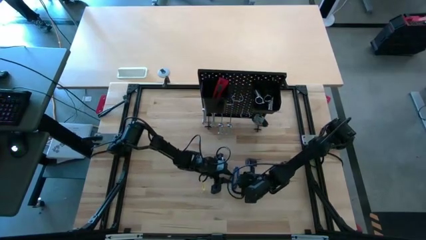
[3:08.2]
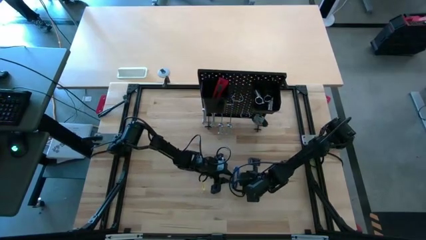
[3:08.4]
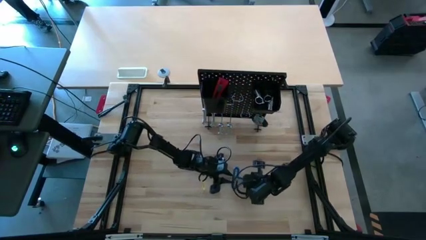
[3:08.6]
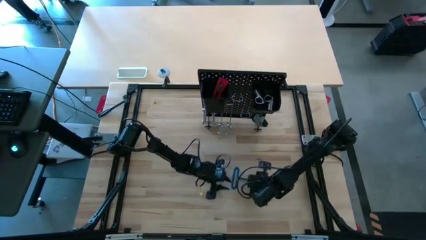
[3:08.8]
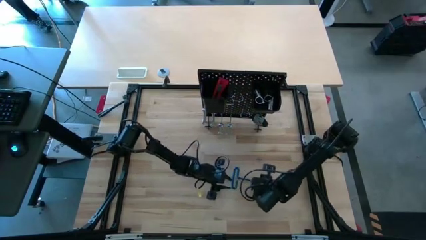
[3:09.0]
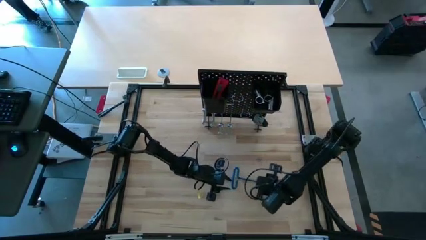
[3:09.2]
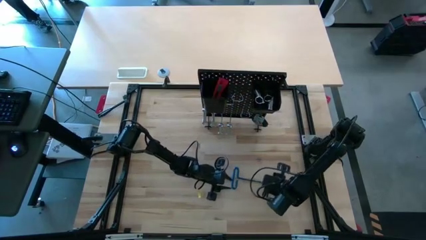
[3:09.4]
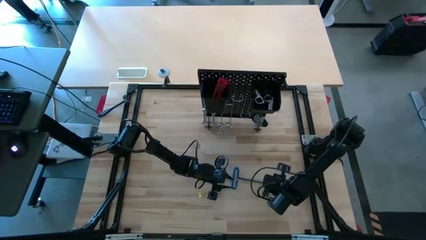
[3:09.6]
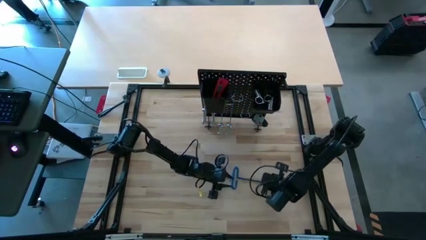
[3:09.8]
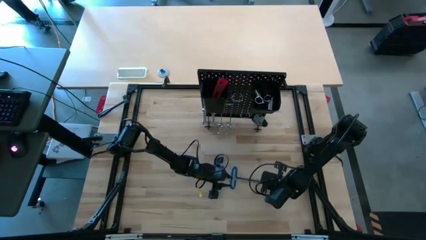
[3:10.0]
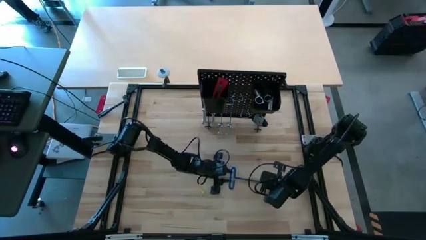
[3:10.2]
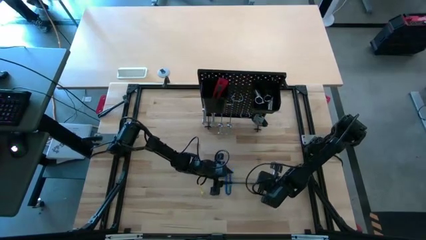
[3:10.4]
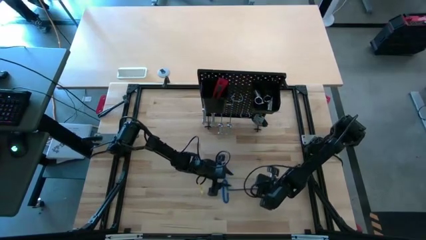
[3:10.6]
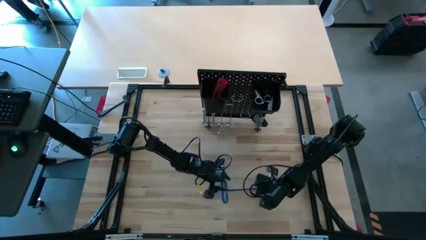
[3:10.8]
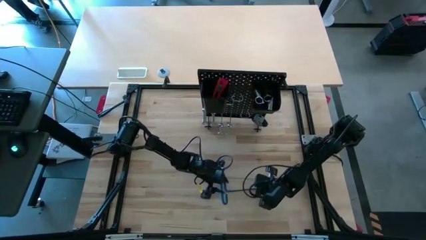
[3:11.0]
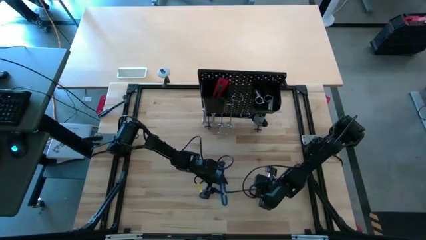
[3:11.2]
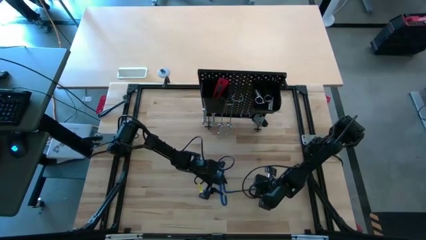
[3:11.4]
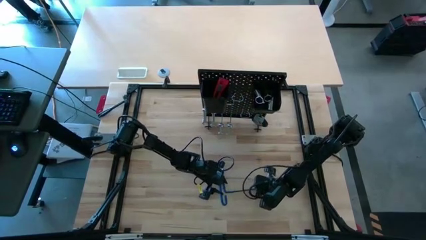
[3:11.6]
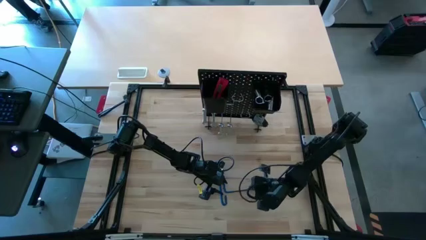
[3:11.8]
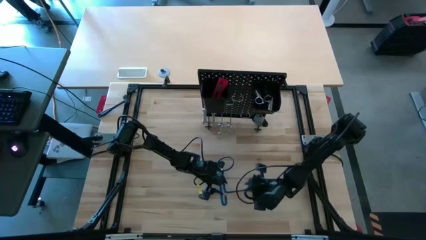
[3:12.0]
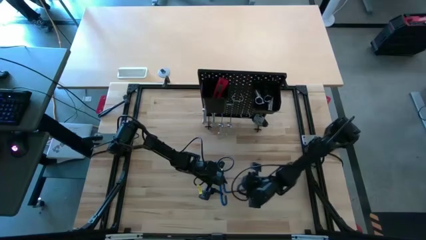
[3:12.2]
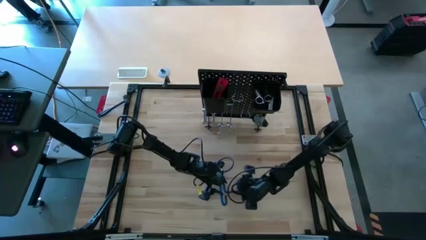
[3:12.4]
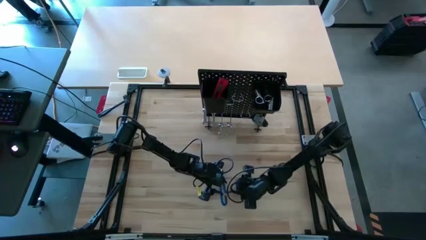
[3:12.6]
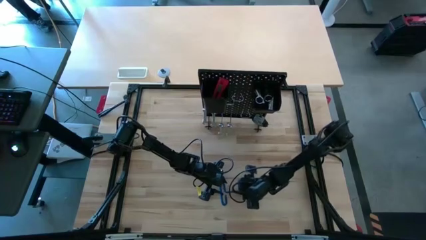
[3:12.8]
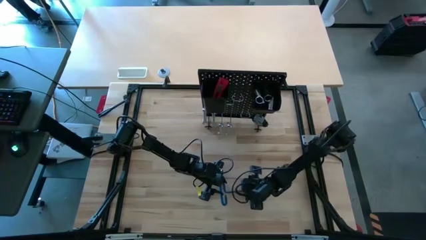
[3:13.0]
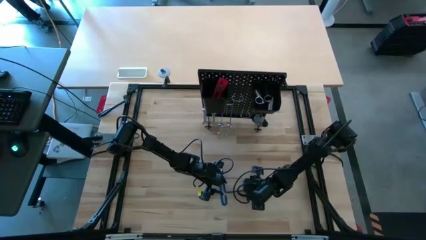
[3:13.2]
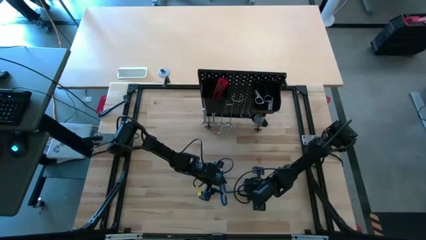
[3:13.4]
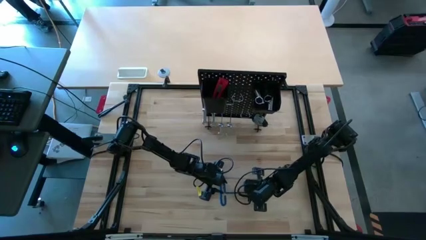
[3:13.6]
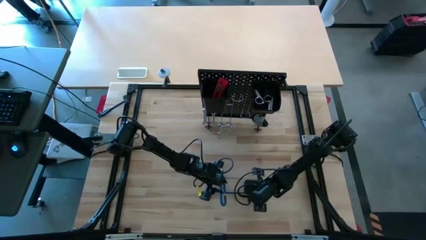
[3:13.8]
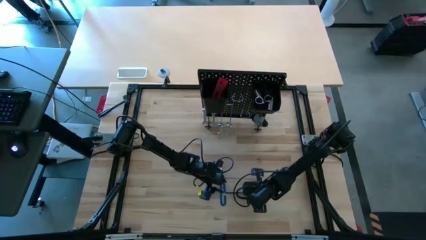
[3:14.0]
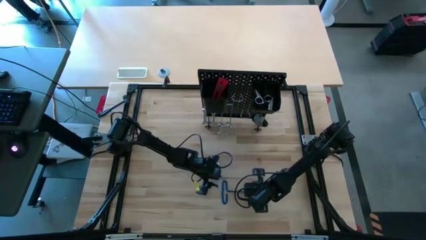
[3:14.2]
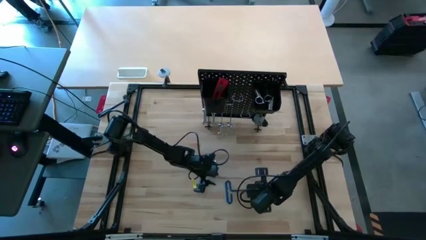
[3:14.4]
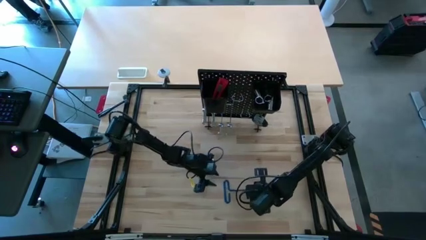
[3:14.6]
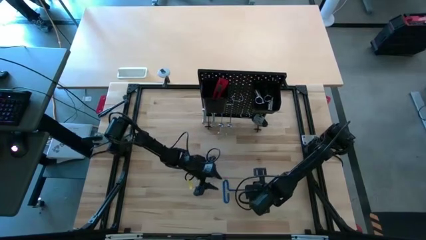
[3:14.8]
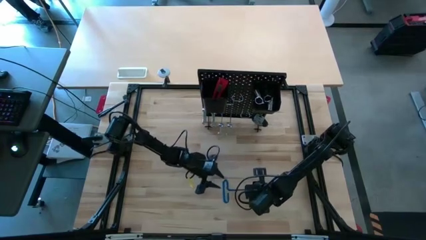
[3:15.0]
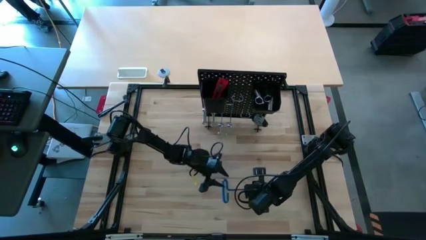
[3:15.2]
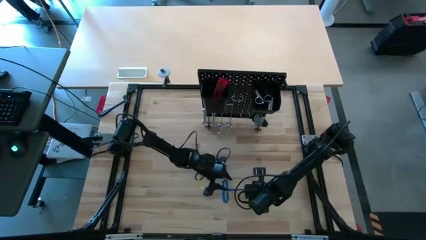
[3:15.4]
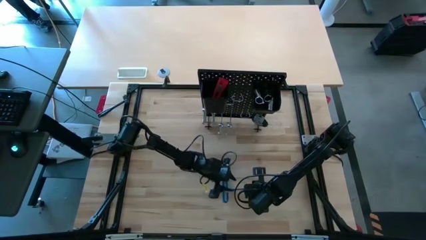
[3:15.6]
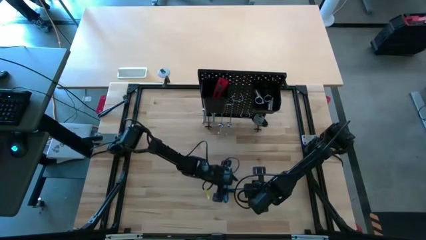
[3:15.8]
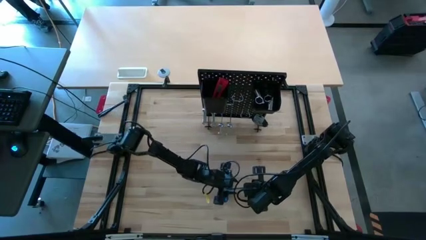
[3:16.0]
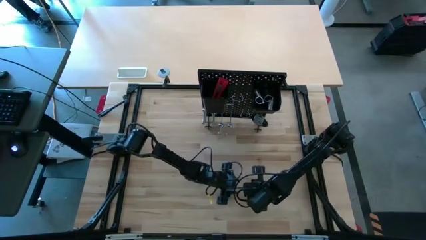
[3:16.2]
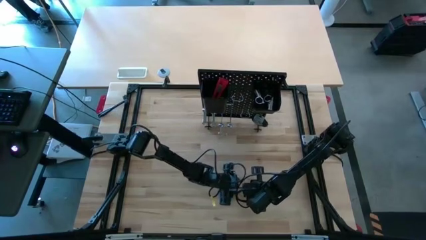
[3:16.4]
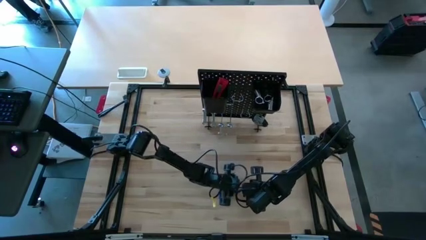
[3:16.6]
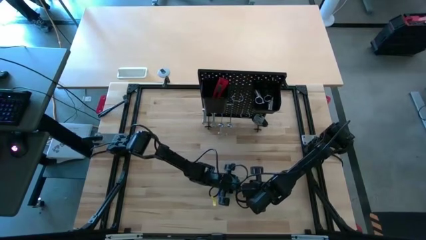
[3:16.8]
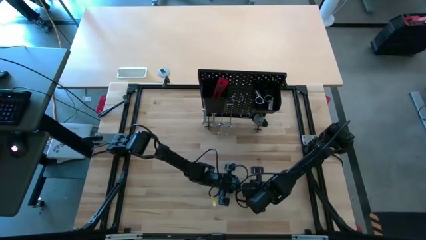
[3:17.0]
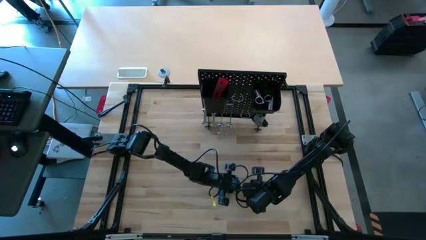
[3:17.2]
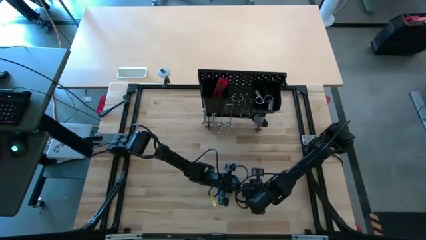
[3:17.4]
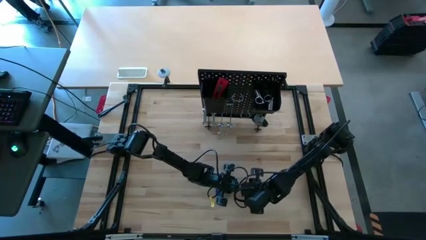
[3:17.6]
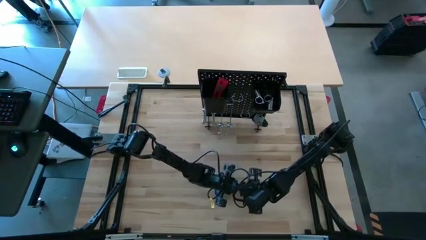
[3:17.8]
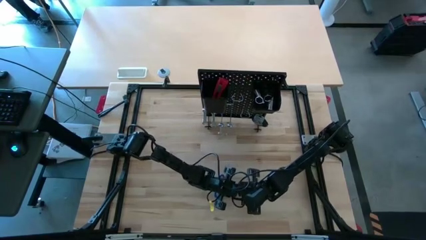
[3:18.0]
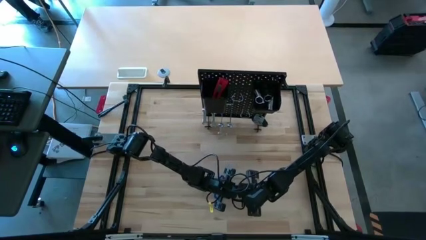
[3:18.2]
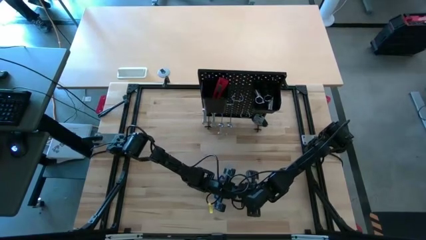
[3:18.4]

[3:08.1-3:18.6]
Task: Hang tools onto peg board
Put the pick tool into the peg board

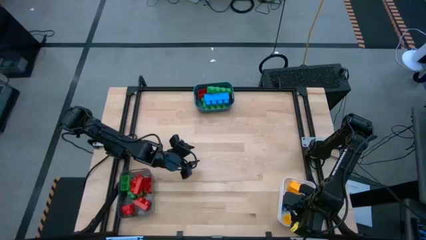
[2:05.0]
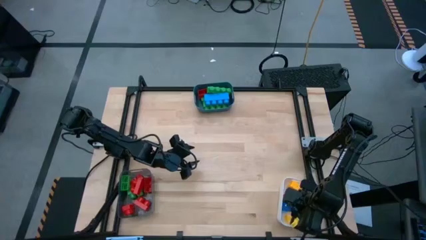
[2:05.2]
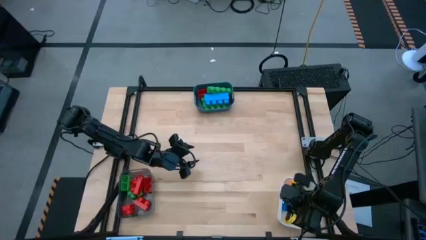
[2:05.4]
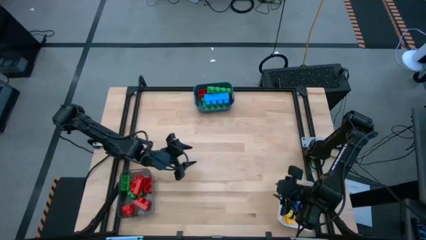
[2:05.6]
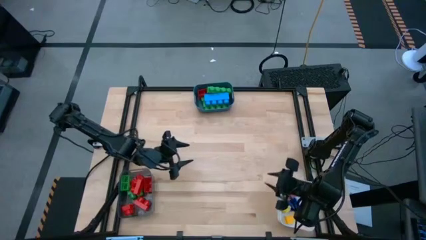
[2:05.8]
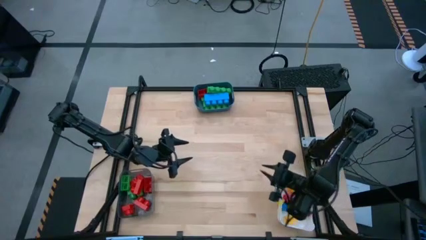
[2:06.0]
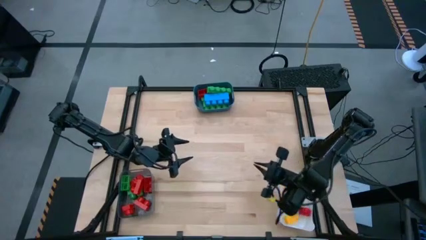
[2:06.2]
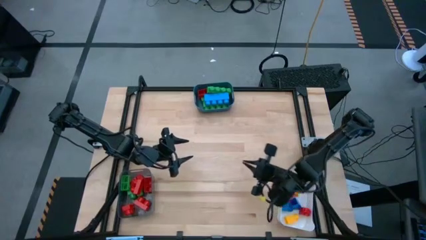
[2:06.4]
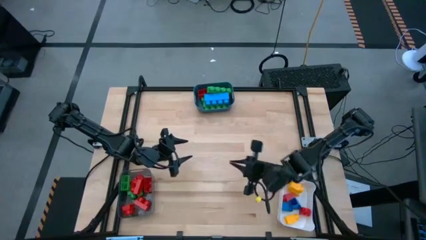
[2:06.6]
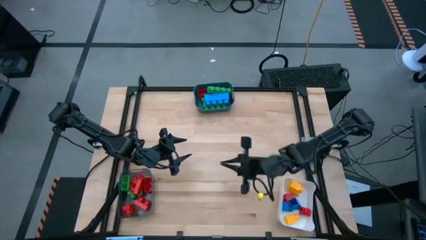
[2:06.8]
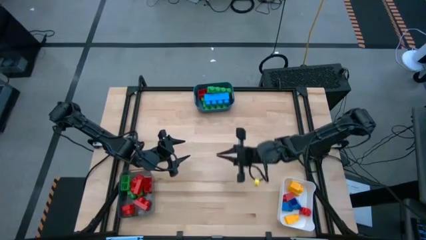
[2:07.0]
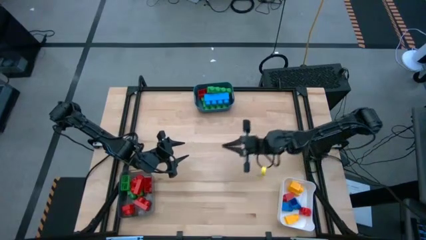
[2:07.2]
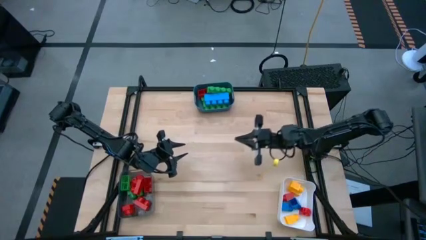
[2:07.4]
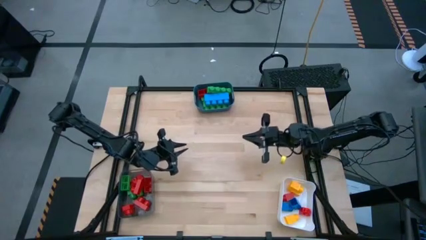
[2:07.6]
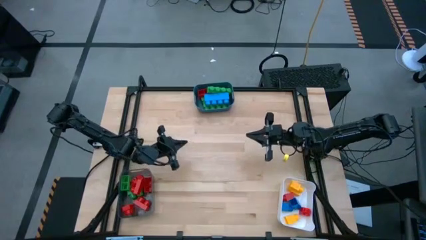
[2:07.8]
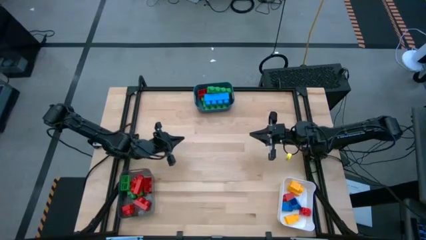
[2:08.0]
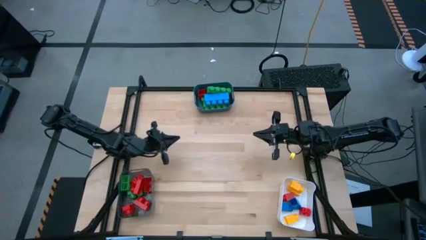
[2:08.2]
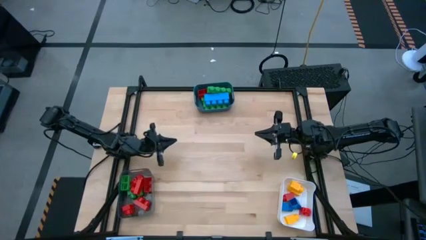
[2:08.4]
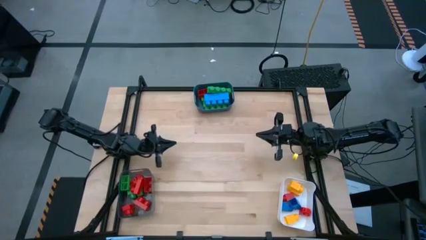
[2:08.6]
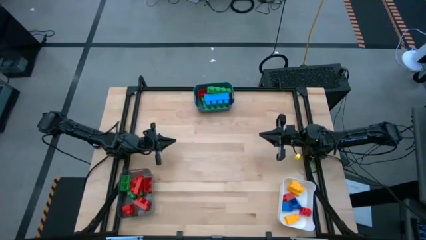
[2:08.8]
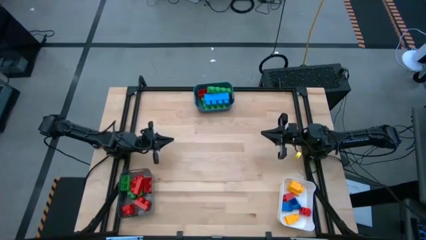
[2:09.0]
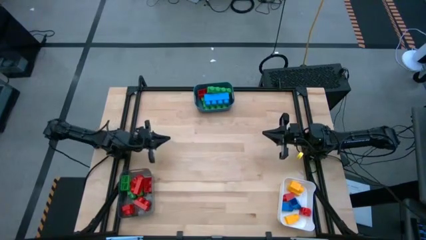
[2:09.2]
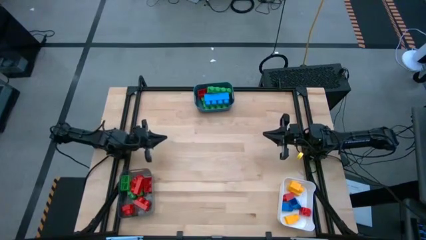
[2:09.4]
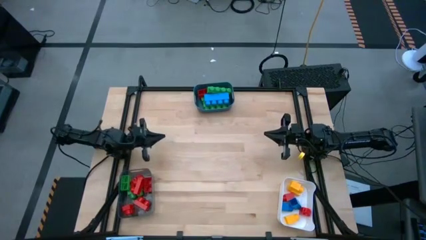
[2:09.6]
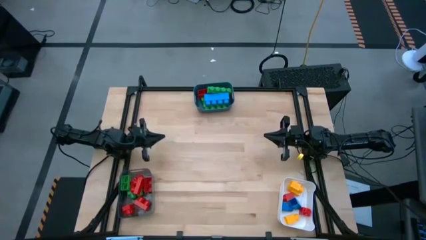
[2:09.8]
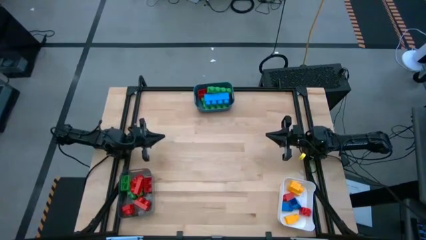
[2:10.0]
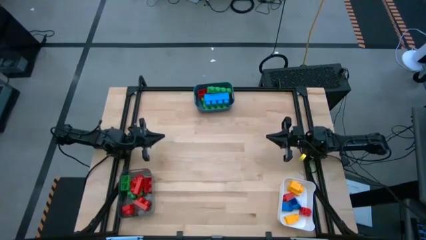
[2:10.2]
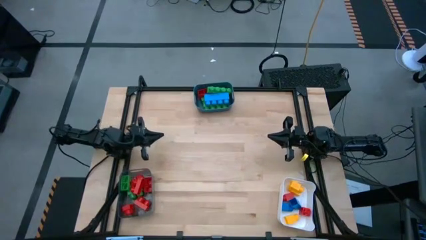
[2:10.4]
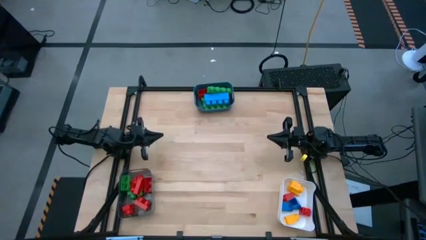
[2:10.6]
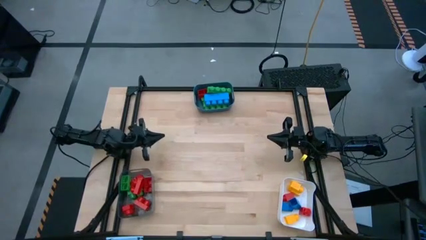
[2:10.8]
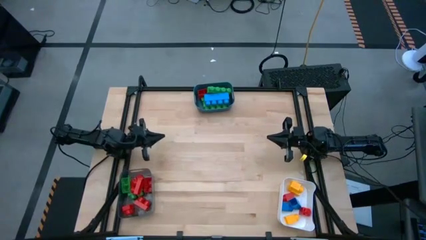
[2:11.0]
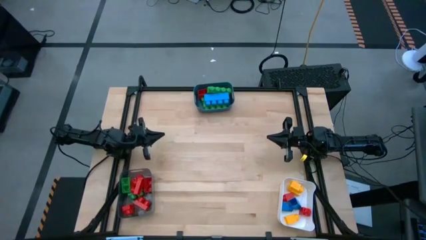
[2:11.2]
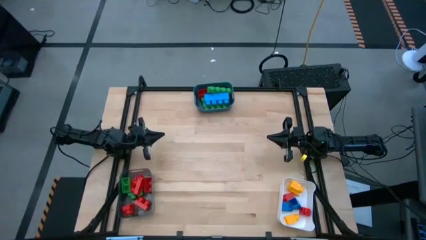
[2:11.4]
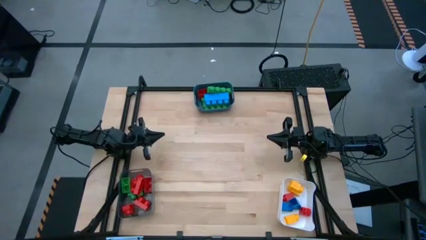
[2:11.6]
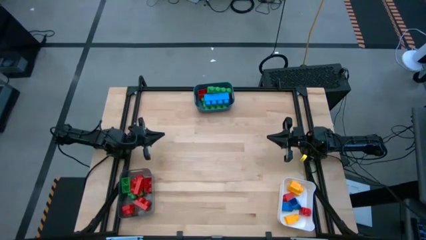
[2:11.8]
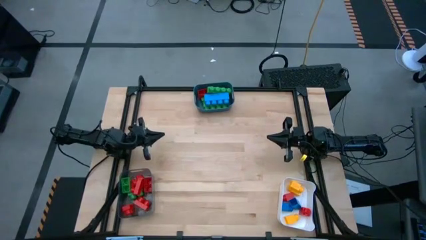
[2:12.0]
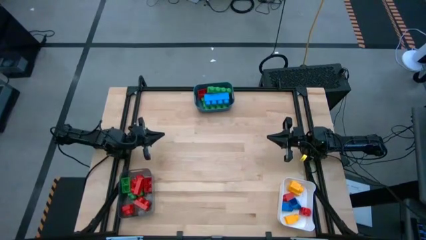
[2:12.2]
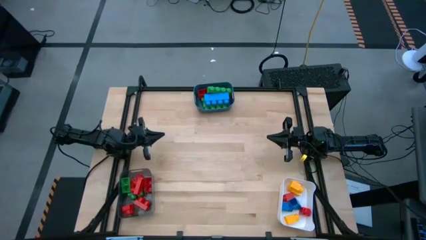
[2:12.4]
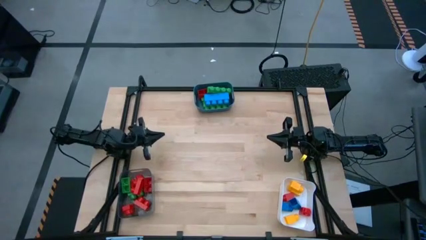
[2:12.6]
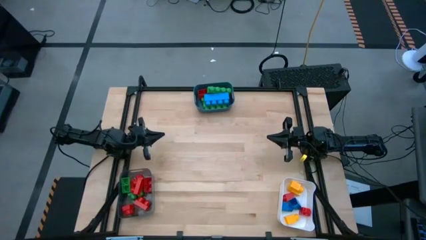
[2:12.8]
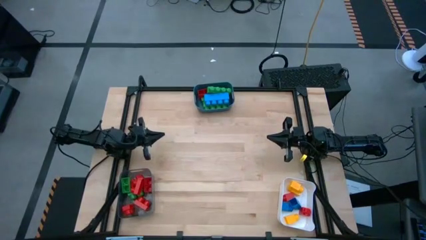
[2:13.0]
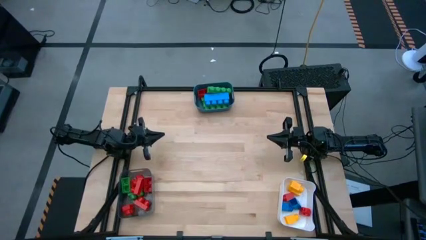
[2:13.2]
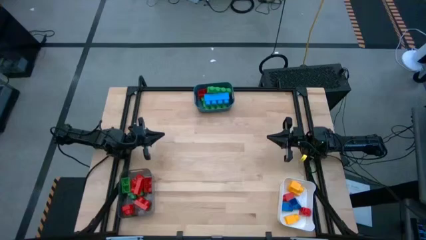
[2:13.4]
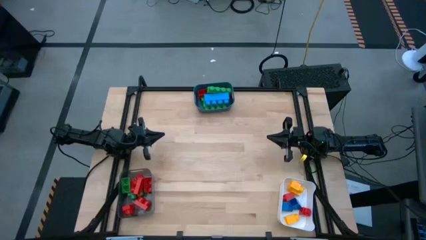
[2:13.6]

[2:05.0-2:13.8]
Task: Sort blocks by size
Return to Home Position
